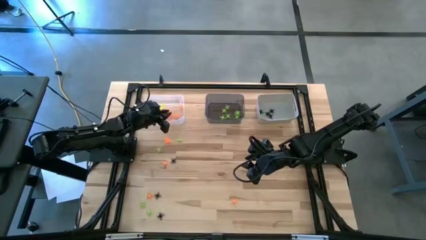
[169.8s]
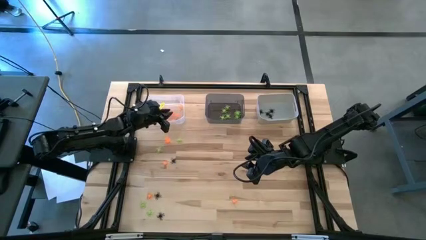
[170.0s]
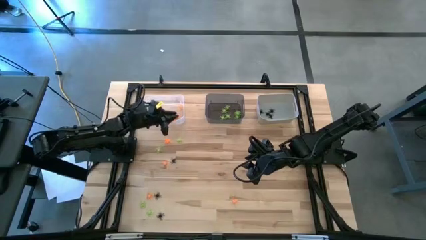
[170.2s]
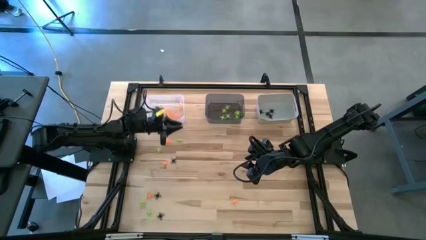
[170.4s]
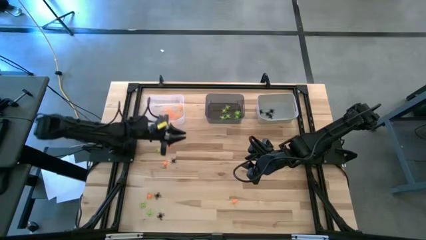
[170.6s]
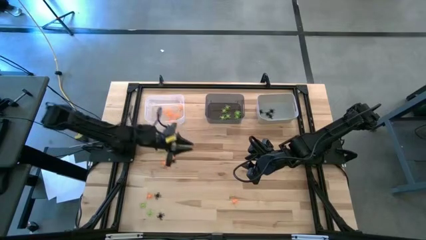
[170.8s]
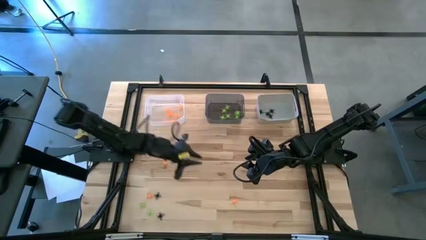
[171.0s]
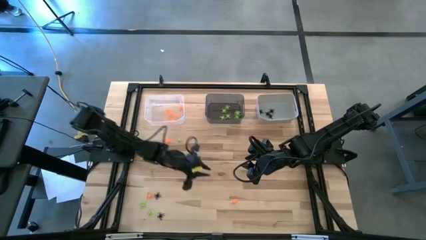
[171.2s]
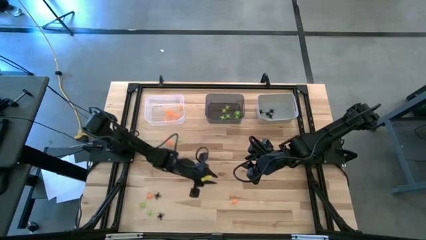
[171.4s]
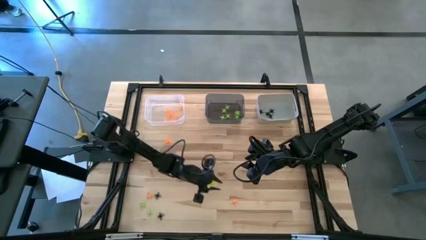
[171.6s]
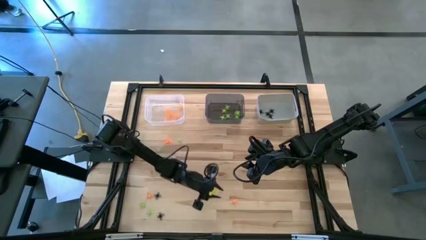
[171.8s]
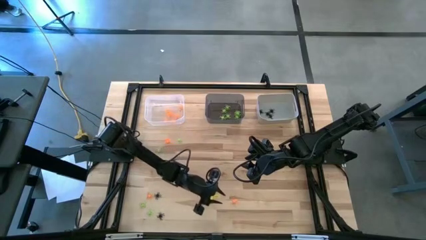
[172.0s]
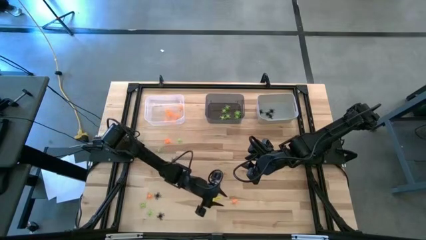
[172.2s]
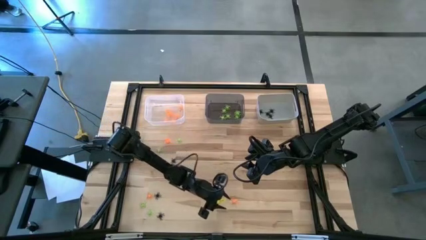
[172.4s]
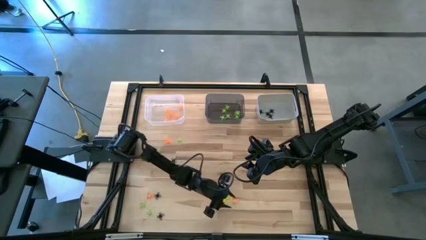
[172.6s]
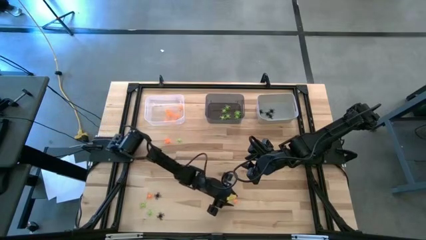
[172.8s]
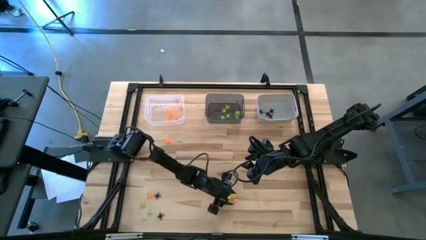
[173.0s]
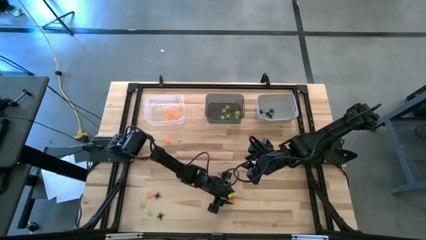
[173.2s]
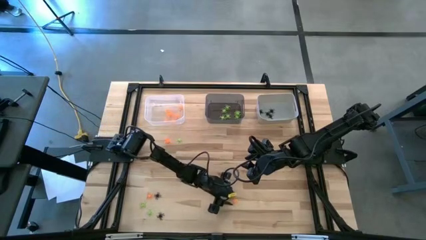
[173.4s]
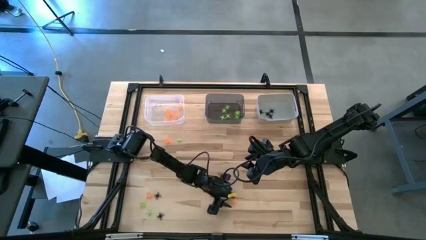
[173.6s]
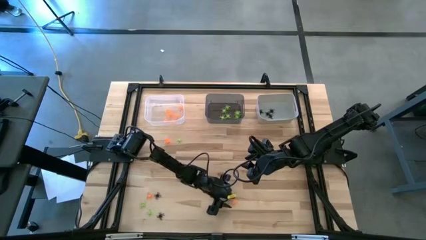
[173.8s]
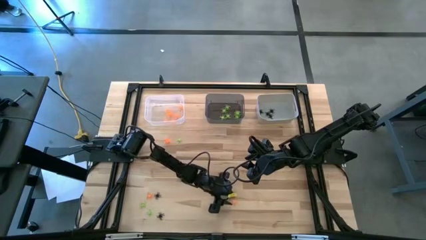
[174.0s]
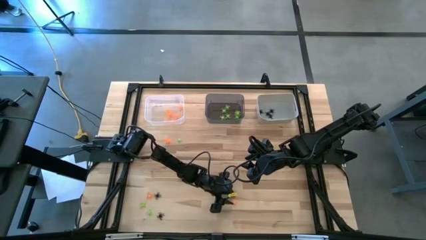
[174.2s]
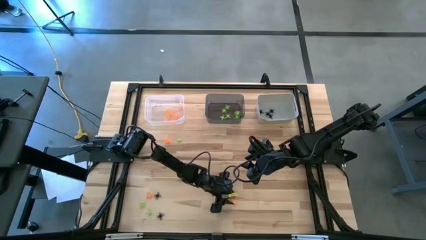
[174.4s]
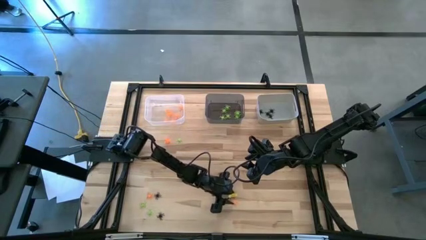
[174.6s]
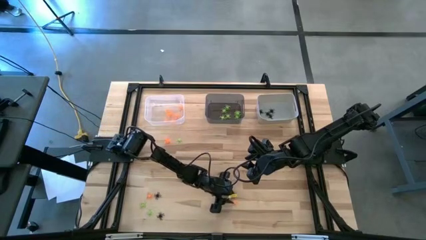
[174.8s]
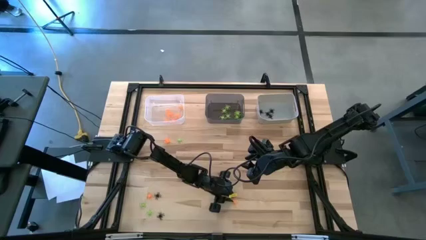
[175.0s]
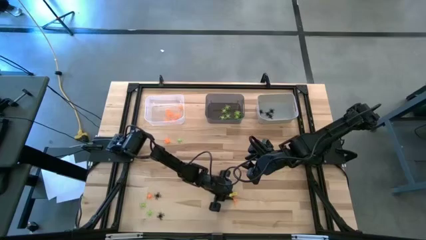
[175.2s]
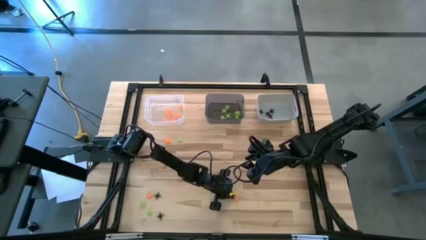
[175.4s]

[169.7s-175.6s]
Task: Sort Halloween decoration
Put the orange spider toy into the transparent bin

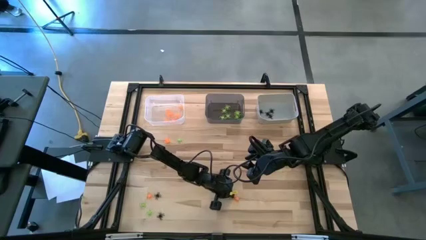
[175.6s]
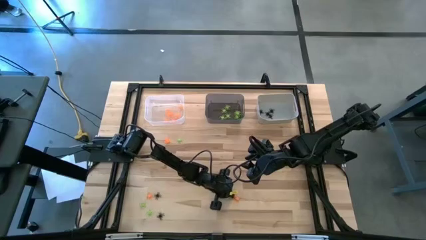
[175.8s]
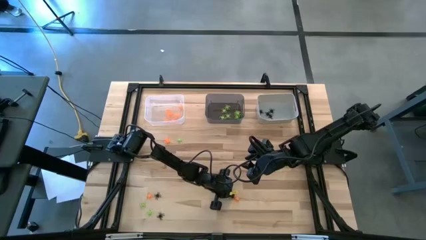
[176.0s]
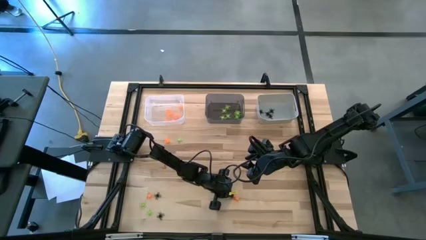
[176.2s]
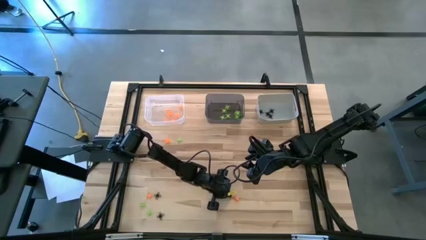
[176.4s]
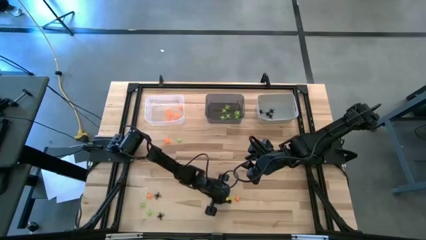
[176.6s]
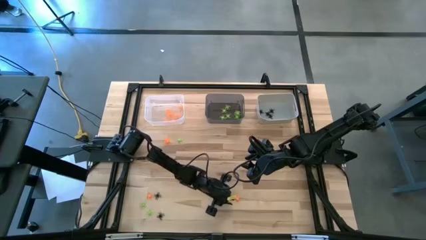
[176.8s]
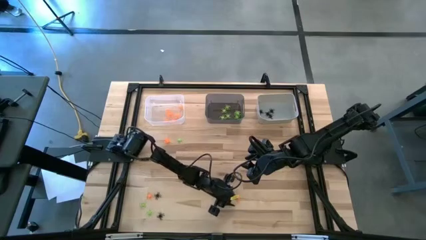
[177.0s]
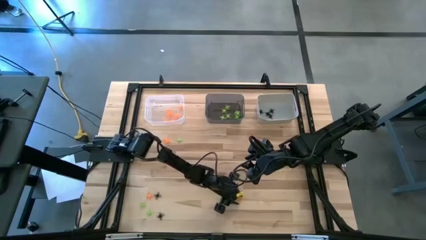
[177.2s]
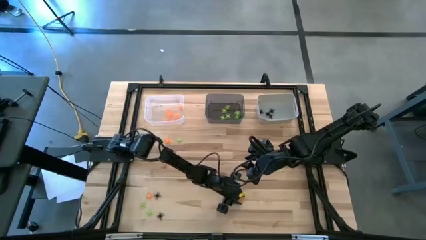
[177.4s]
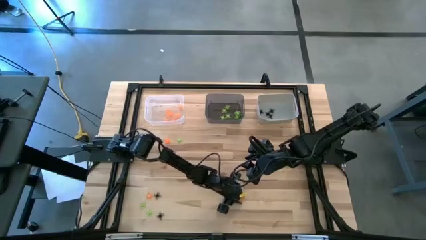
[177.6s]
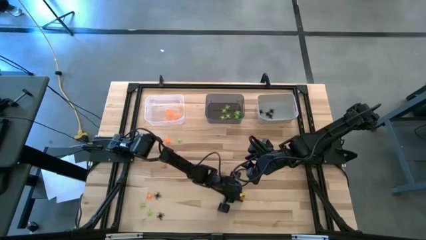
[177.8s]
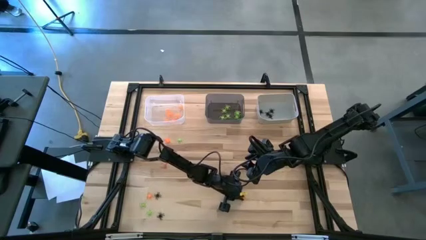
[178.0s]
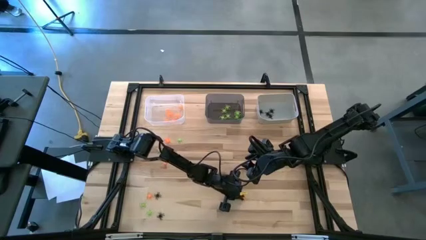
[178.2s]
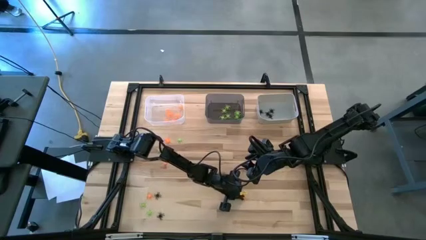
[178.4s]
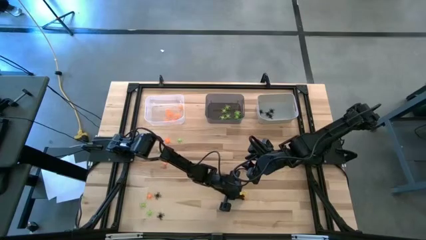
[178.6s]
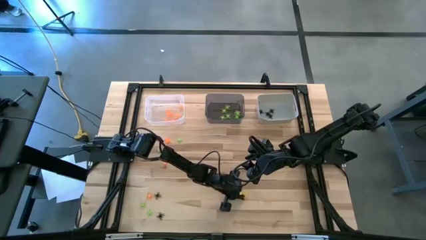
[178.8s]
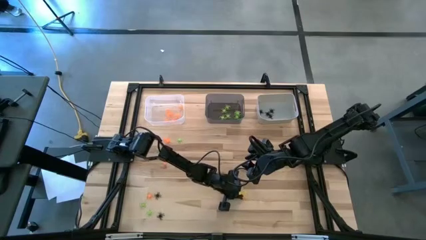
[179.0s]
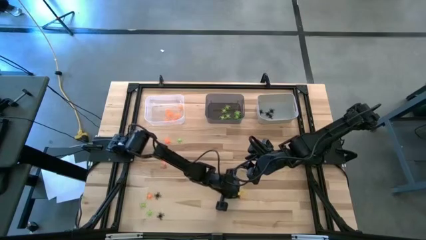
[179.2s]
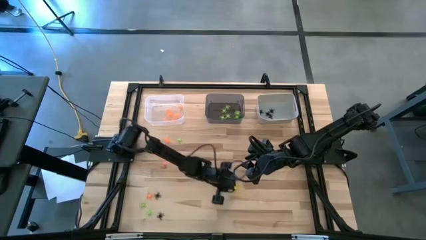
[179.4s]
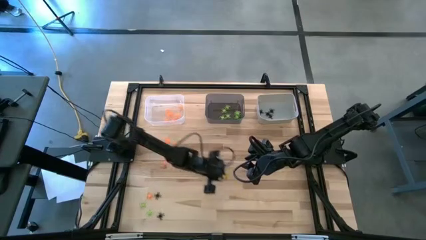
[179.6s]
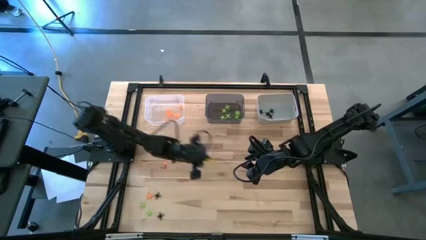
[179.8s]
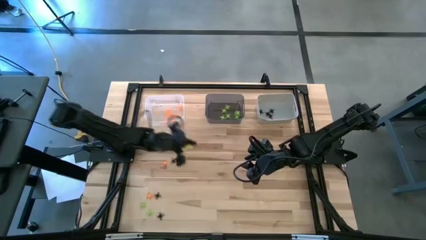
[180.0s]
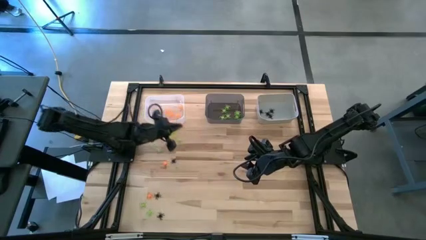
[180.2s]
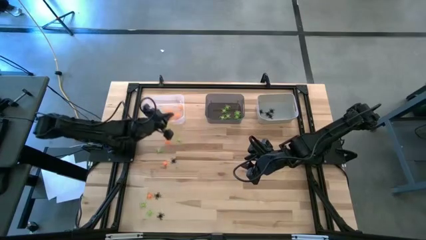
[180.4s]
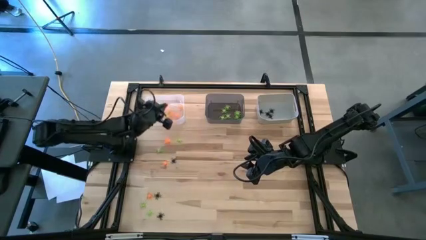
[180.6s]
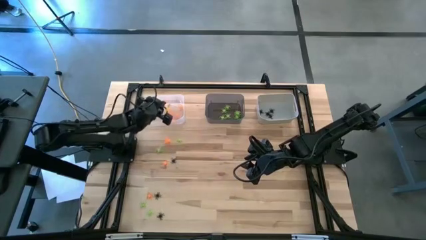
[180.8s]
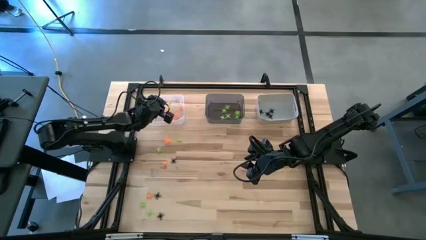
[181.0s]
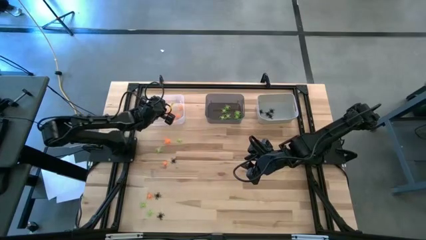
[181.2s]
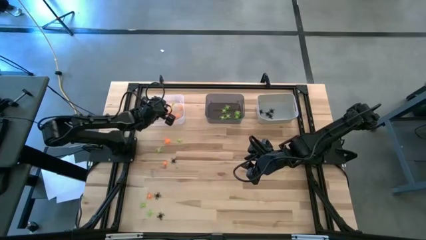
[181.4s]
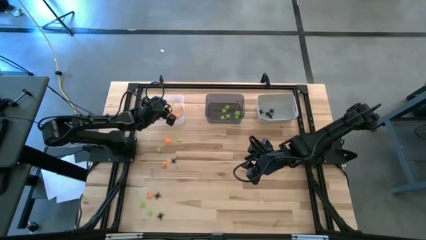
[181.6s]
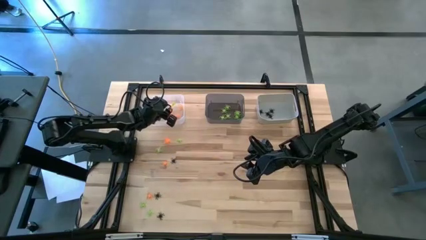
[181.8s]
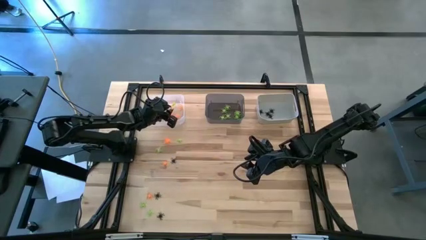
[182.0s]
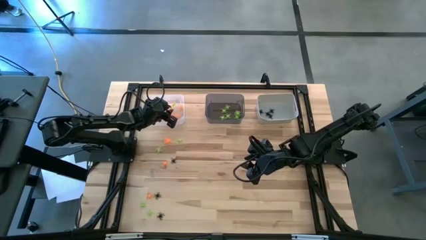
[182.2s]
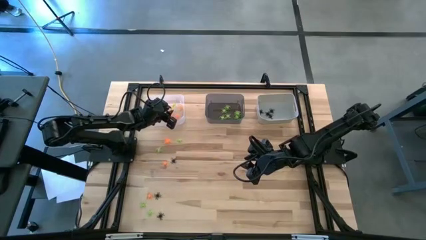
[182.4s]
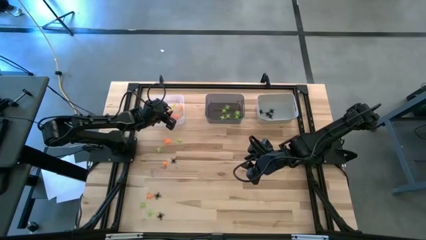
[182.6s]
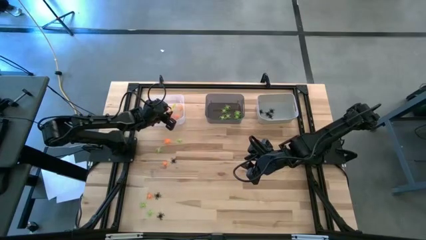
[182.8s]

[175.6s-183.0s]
Put the orange spider toy into the transparent bin

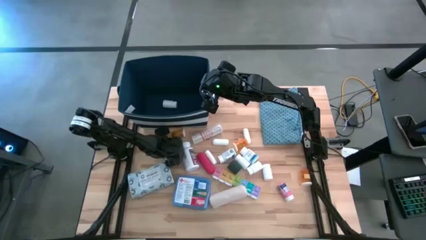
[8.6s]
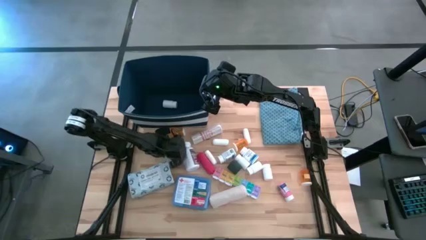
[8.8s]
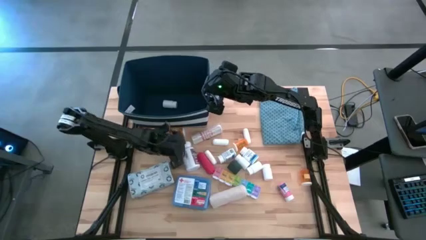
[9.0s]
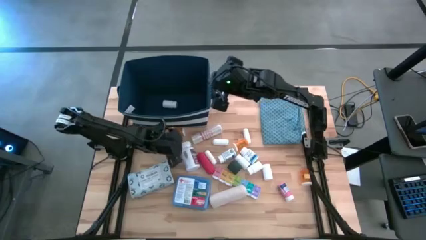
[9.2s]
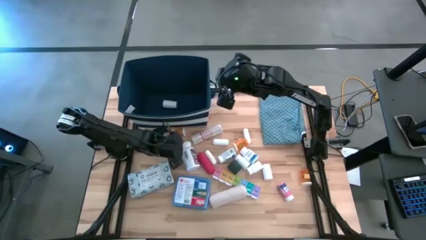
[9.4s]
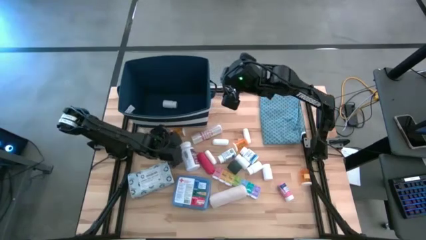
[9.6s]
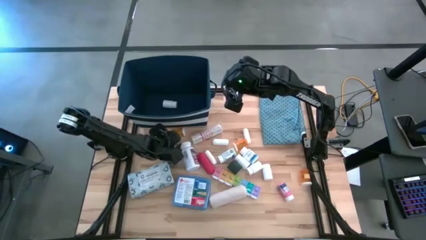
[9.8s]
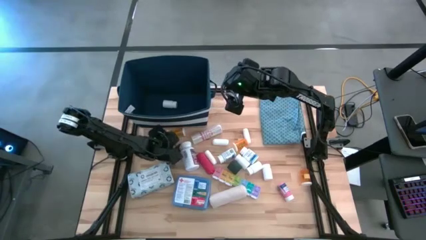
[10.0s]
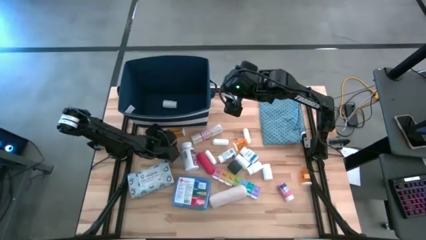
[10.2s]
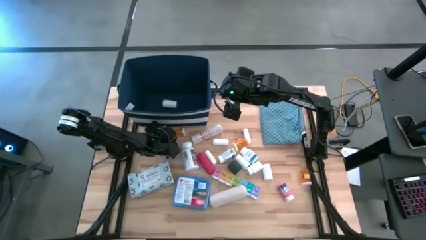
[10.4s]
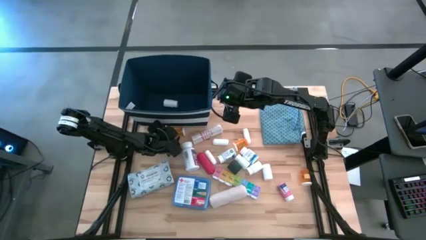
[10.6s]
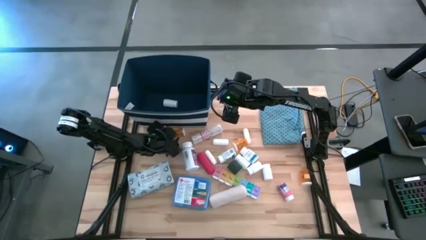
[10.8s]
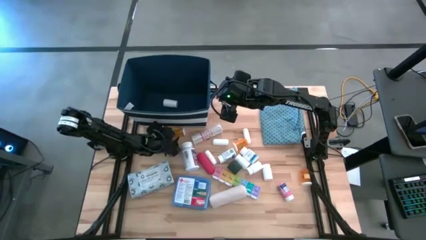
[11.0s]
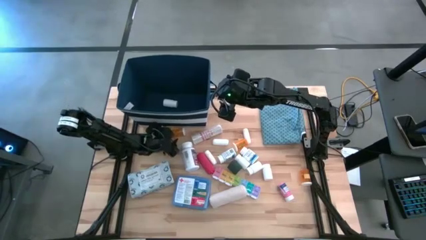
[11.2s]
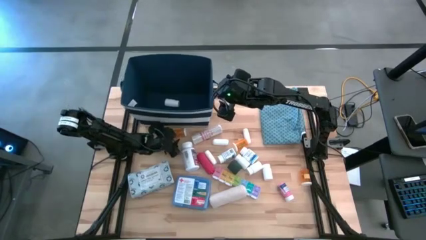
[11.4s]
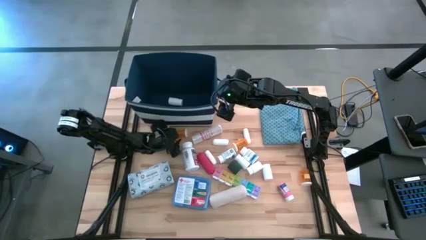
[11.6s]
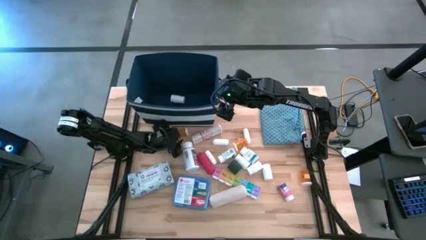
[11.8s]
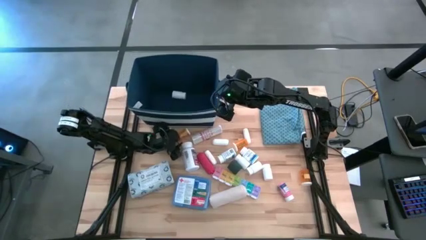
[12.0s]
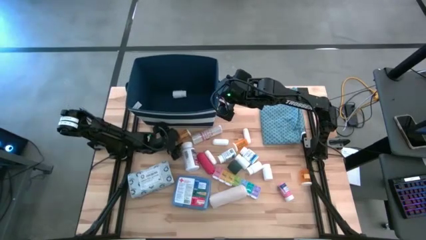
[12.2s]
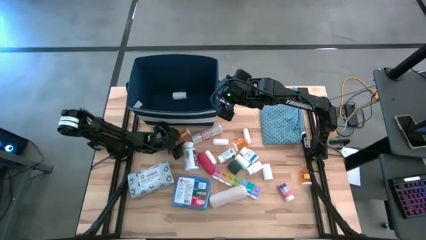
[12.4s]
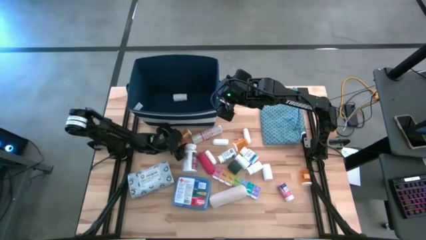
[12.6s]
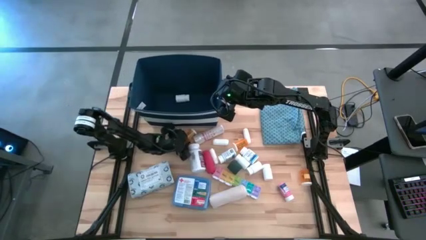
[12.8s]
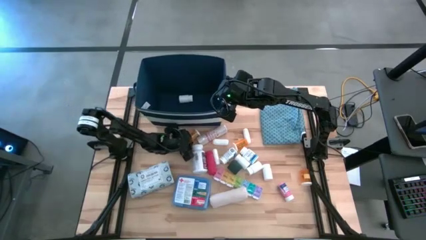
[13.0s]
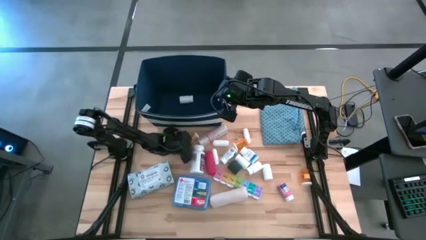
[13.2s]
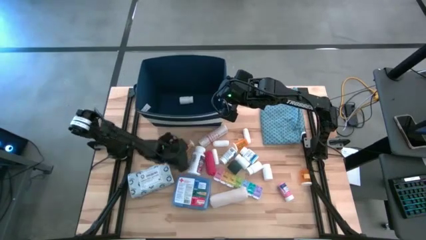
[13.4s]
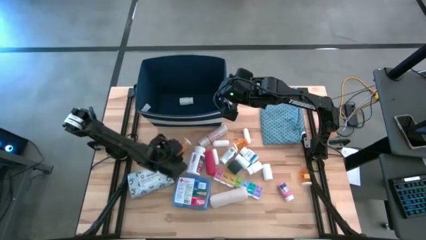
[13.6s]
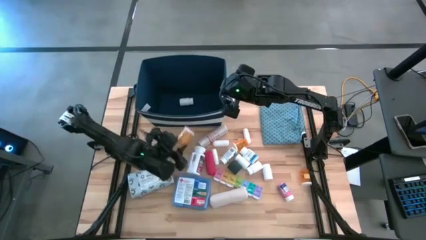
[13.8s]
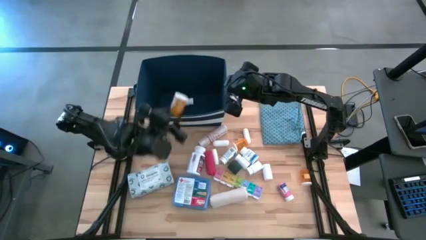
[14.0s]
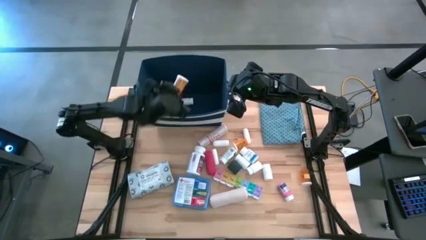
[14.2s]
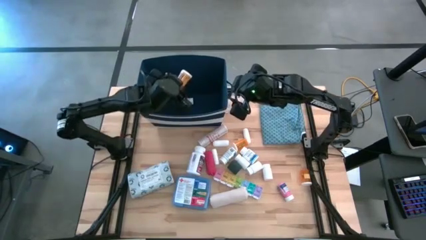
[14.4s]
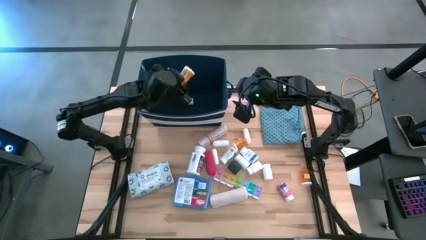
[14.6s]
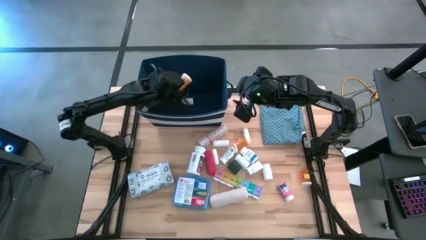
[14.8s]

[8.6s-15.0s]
Task: Pick & place medical supplies in basket/bin
Put the top orange medicine bottle into the blue bin
